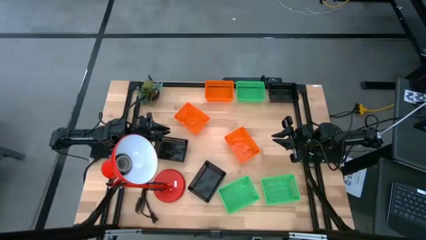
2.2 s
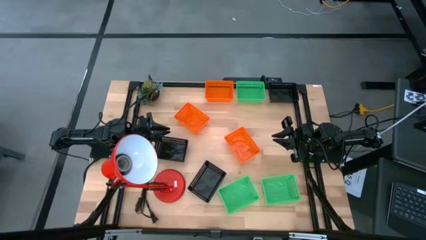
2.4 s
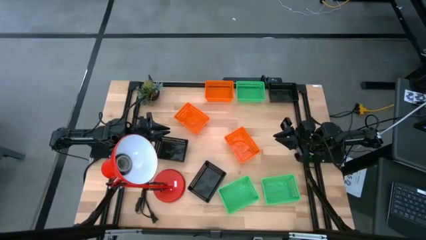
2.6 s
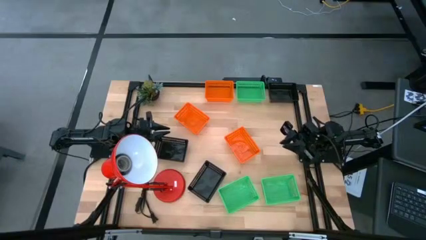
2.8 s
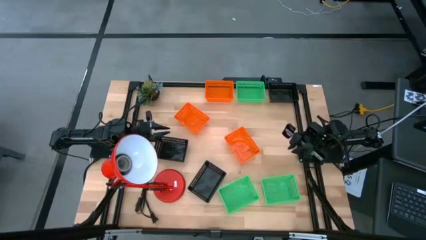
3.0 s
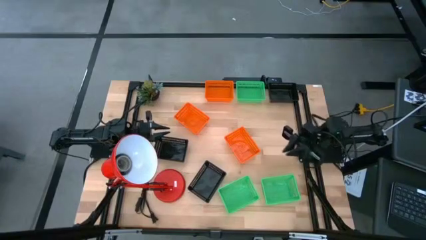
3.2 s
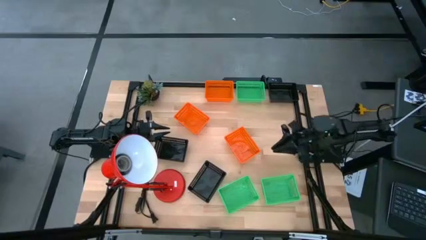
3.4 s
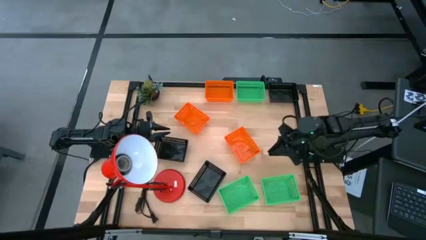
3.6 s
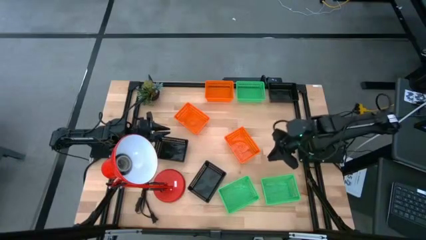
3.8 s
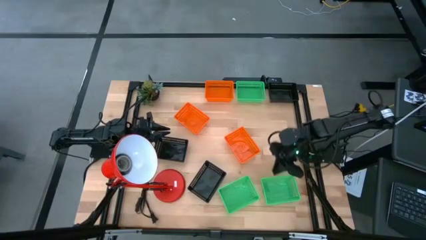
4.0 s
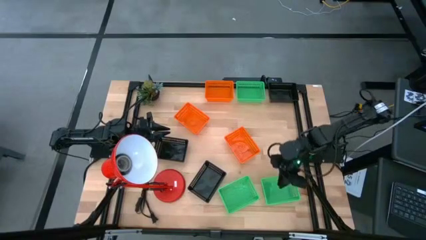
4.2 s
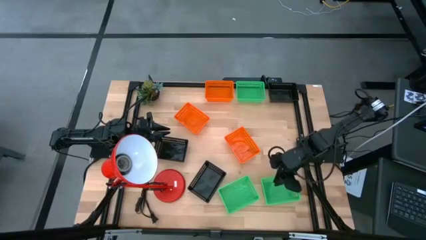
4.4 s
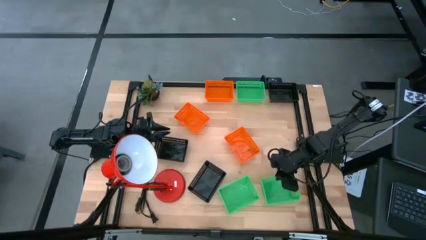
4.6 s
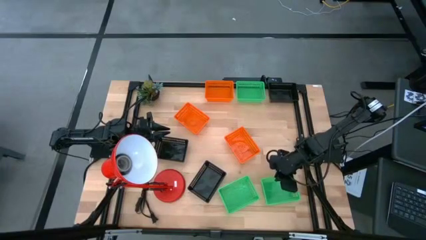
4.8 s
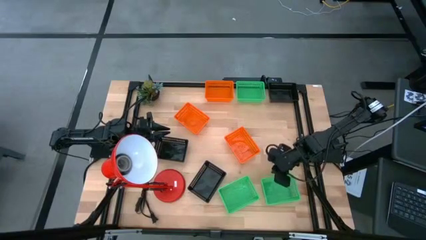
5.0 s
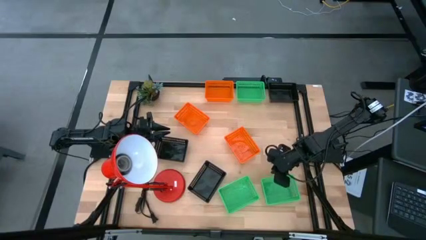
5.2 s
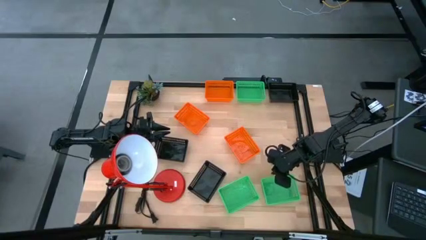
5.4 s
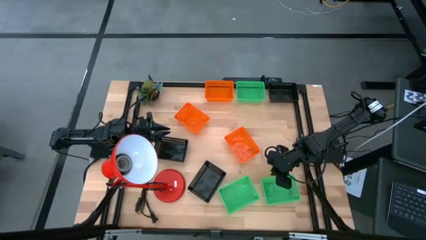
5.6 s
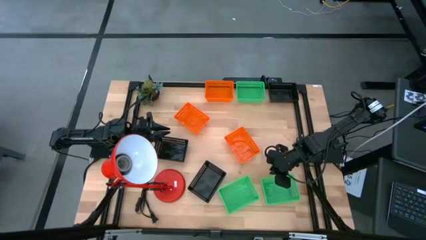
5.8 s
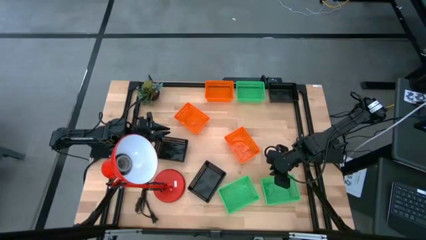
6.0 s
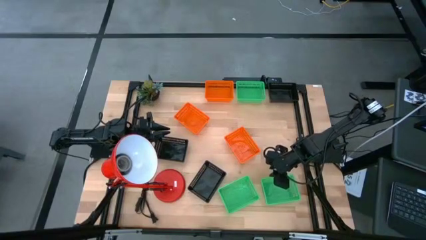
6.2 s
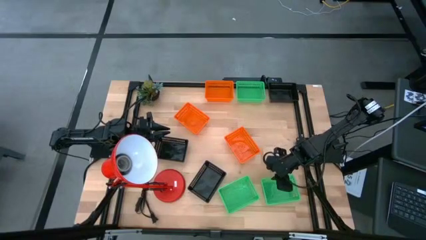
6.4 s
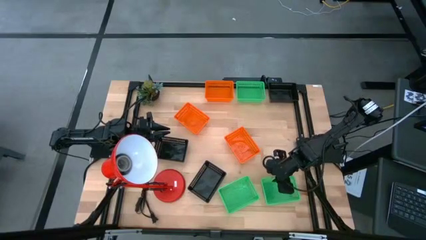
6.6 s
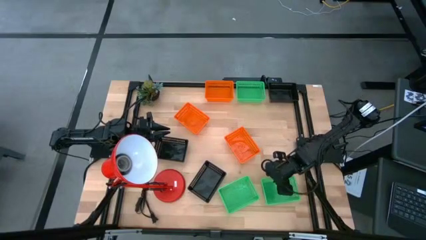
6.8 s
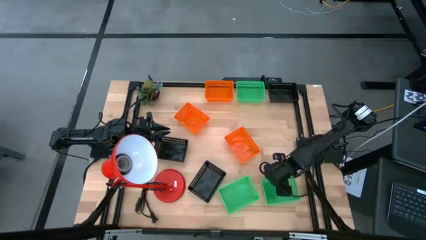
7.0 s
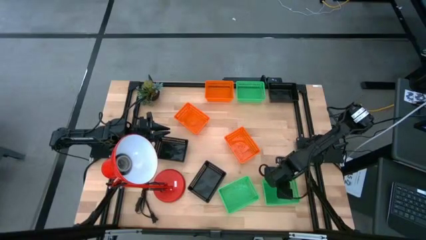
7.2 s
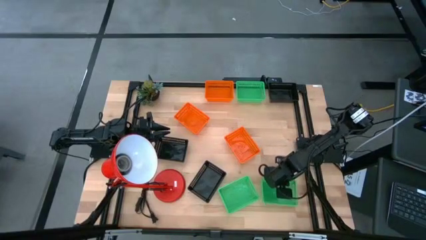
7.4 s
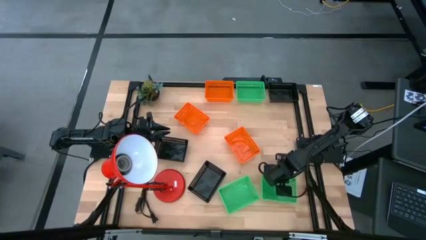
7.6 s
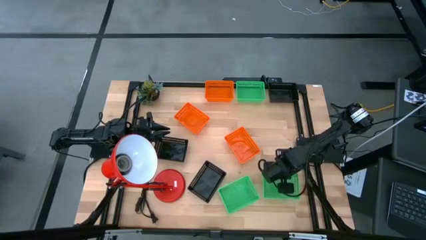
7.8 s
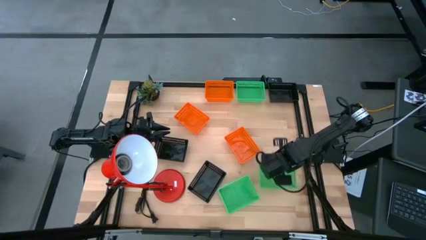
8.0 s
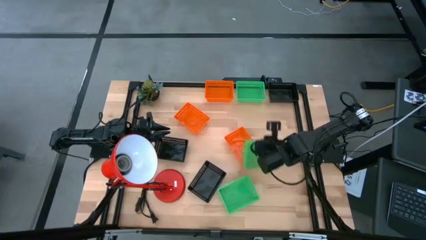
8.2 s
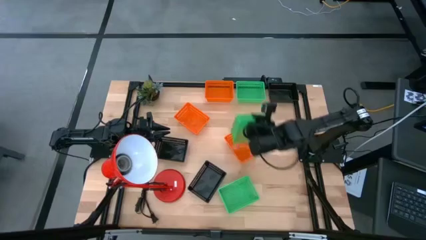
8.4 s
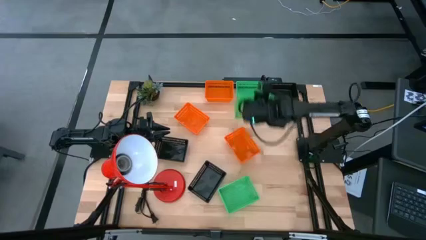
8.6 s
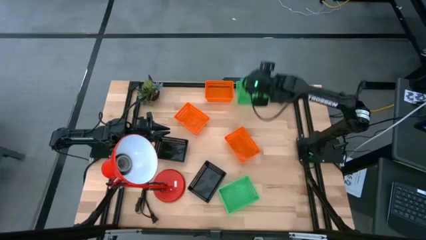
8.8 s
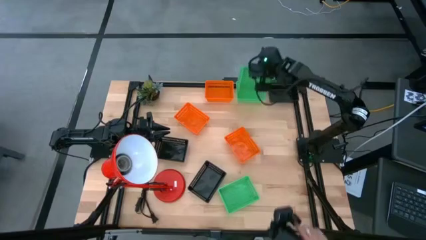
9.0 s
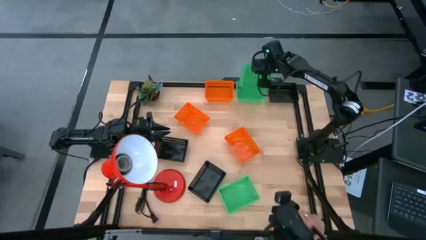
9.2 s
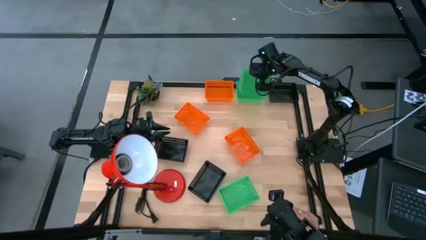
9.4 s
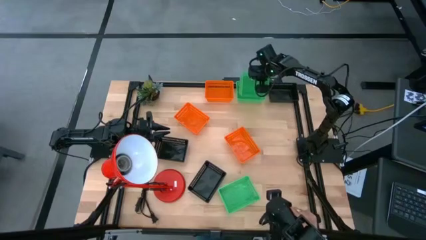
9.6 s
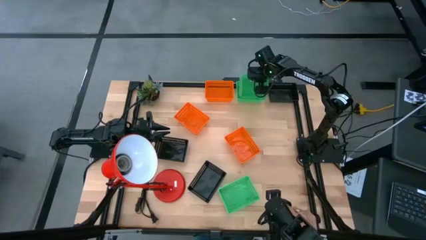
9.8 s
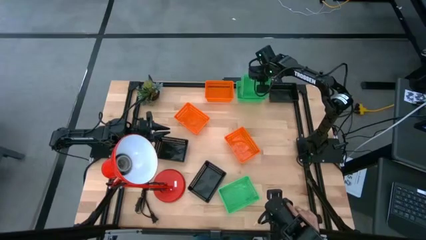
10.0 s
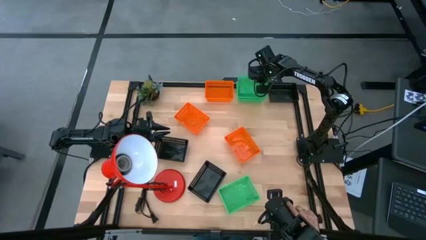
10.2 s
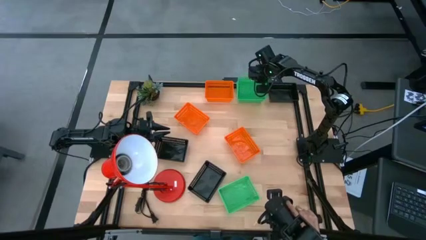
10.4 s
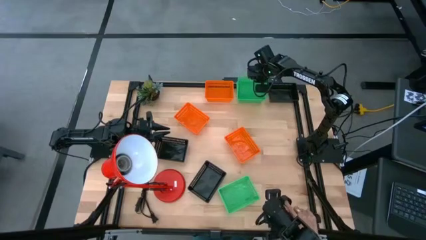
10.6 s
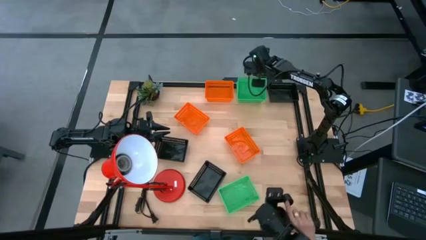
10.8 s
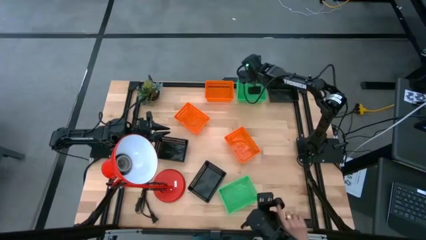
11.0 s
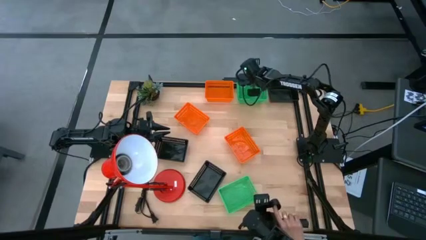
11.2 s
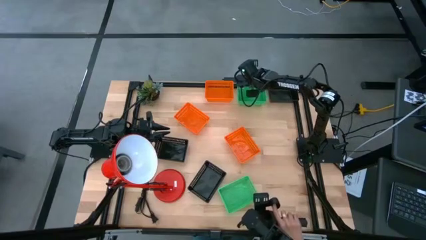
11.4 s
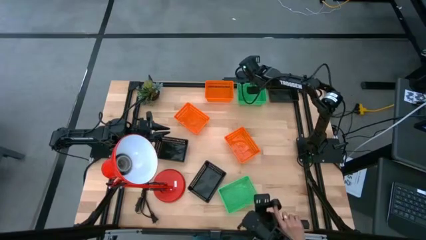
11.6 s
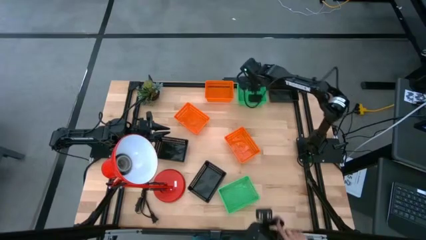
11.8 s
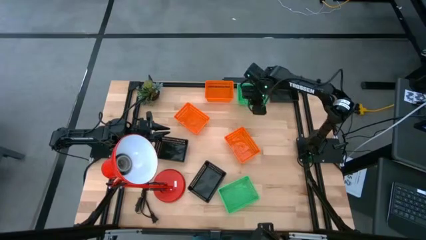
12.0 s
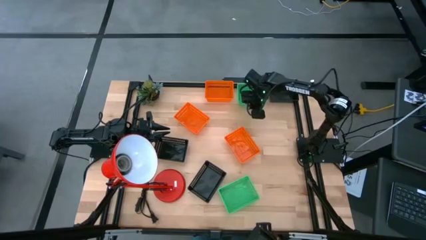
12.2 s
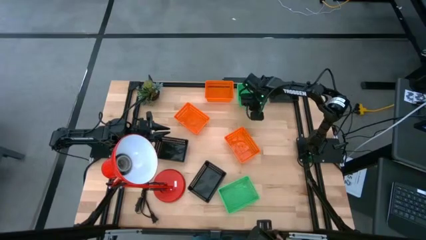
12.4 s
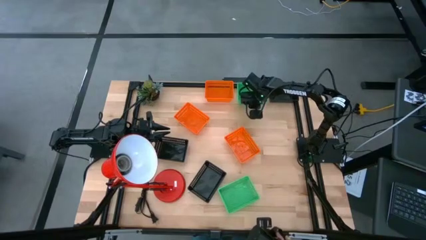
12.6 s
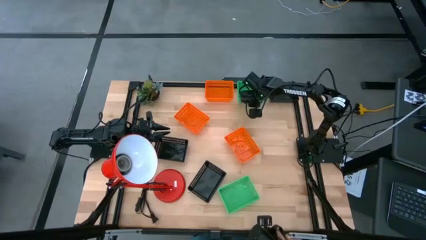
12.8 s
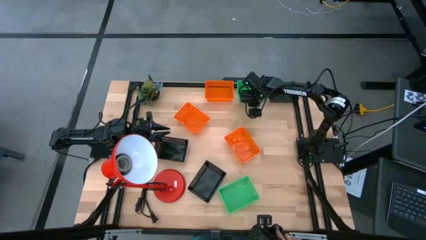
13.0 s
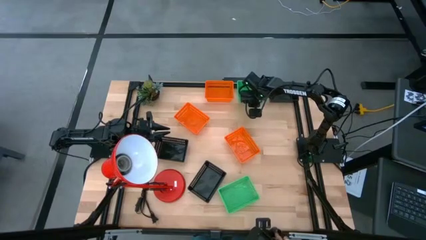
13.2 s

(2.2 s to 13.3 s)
Stack the bottom right green bin on the top of the green bin

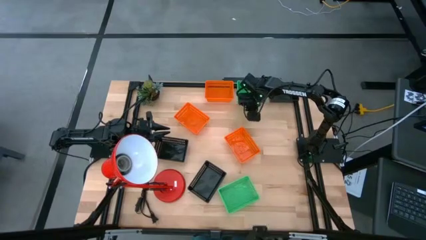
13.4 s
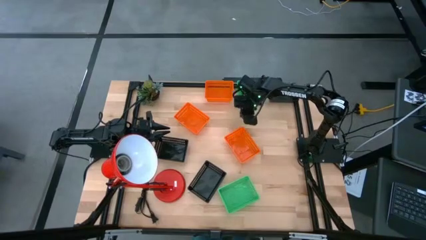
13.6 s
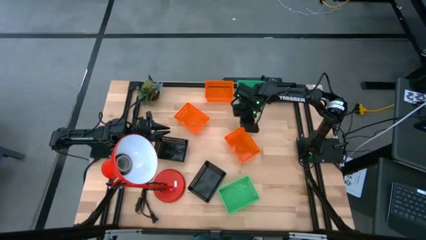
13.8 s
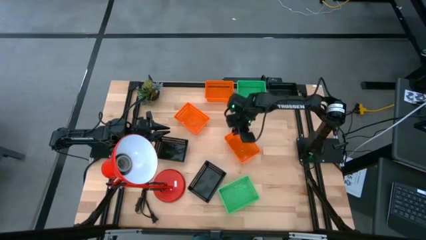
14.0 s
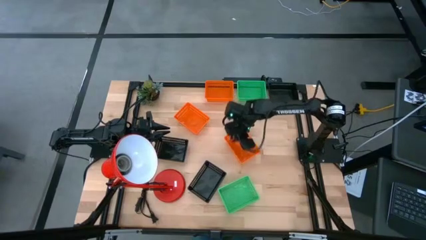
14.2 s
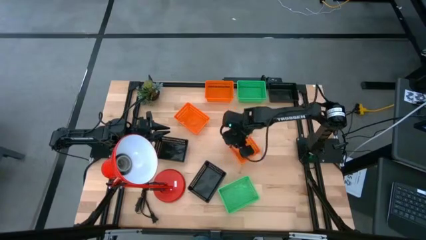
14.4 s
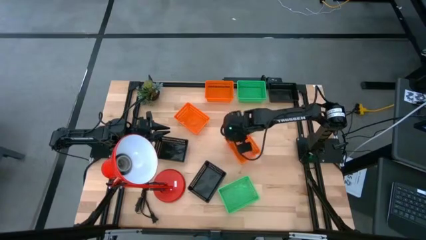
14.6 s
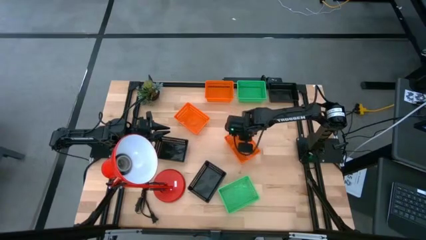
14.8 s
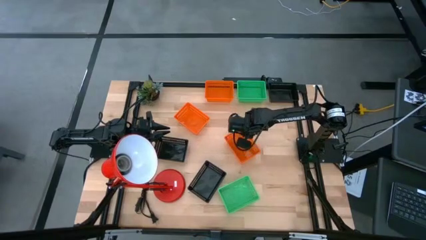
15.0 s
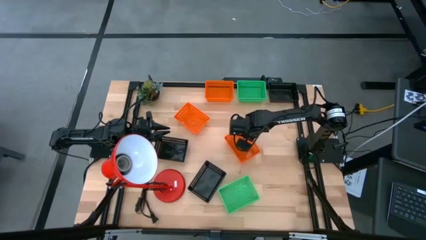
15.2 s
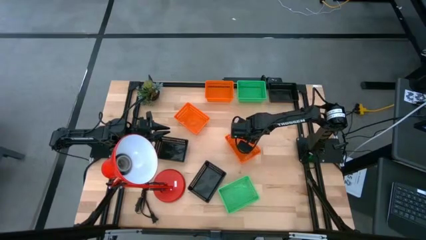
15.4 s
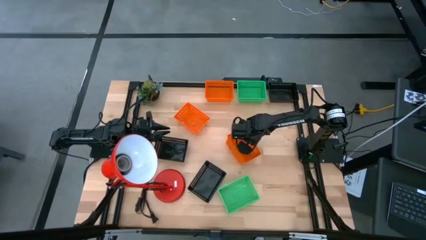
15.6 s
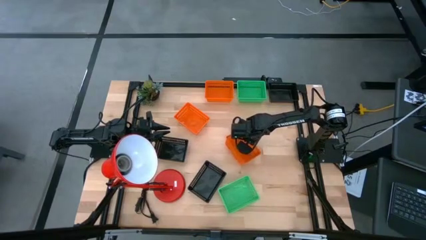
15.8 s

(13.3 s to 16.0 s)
Stack the bottom right orange bin on the top of the orange bin
